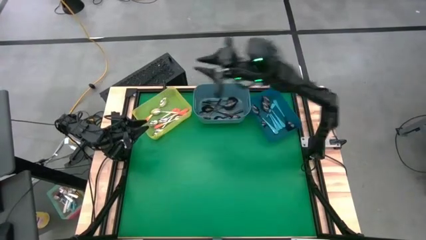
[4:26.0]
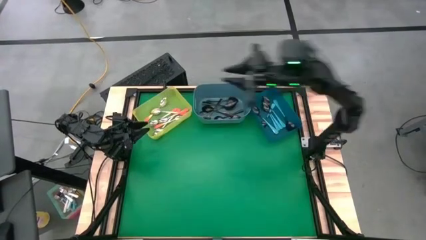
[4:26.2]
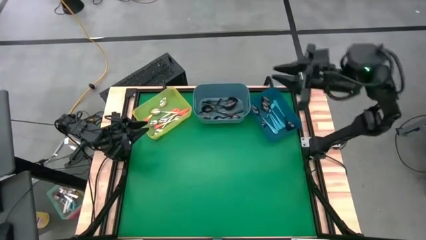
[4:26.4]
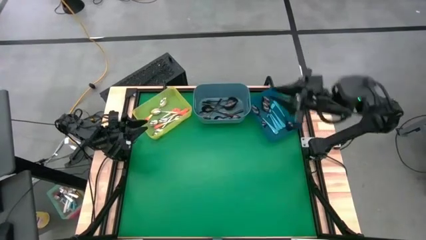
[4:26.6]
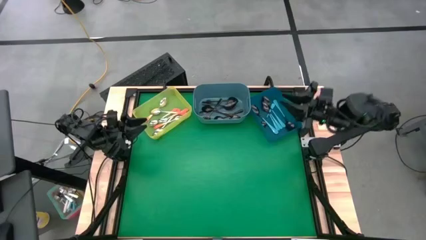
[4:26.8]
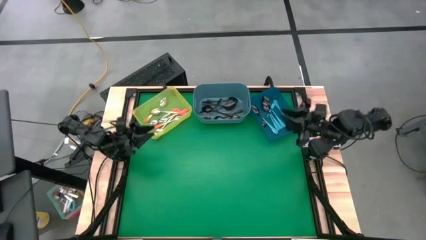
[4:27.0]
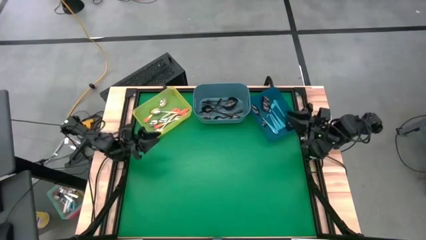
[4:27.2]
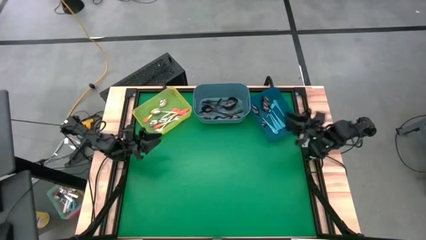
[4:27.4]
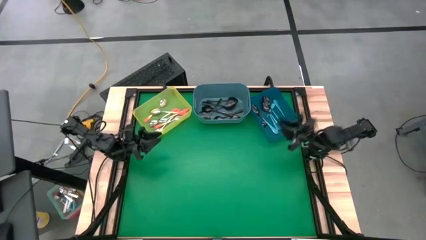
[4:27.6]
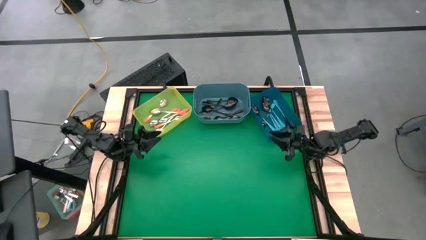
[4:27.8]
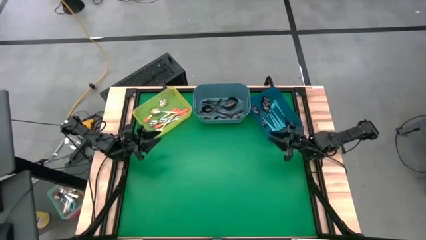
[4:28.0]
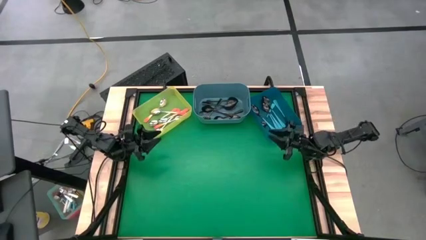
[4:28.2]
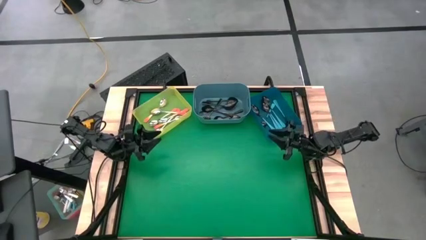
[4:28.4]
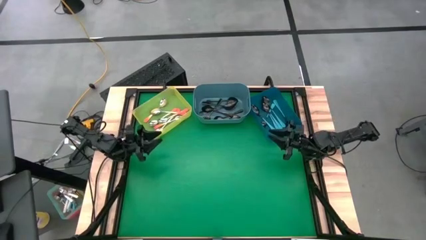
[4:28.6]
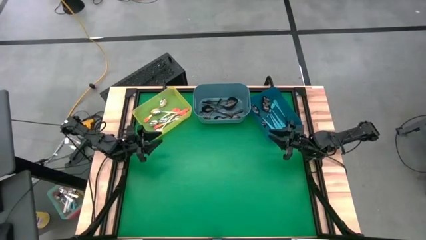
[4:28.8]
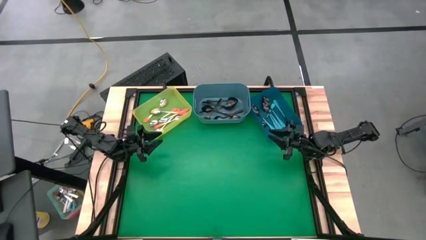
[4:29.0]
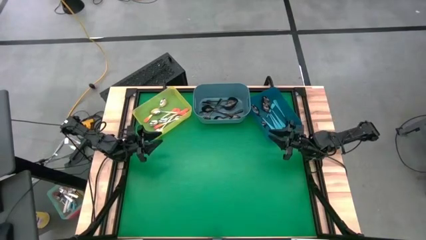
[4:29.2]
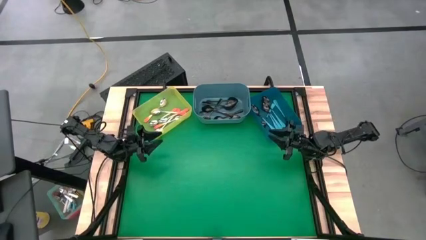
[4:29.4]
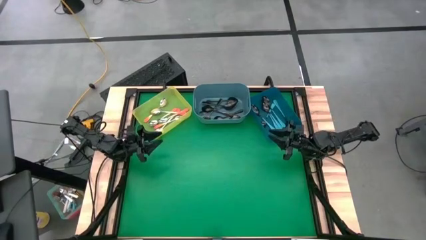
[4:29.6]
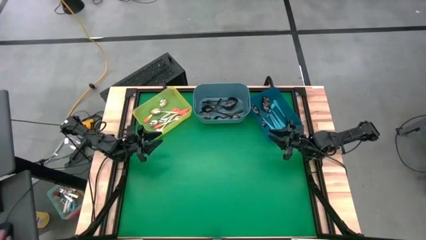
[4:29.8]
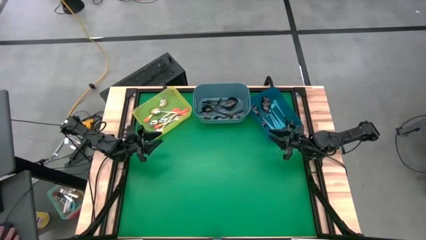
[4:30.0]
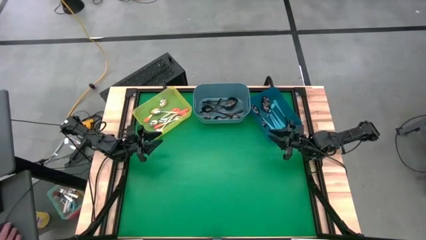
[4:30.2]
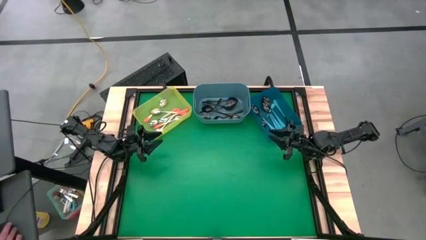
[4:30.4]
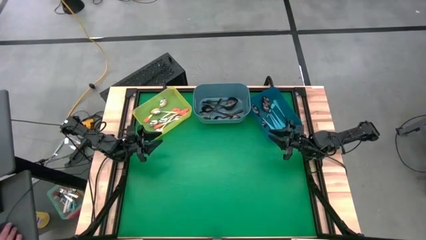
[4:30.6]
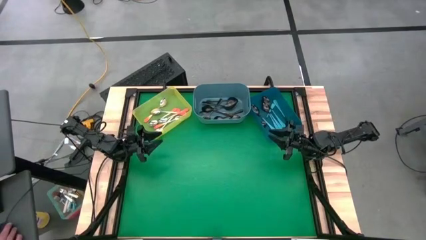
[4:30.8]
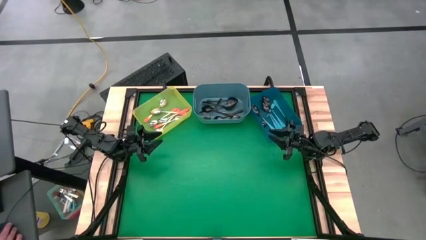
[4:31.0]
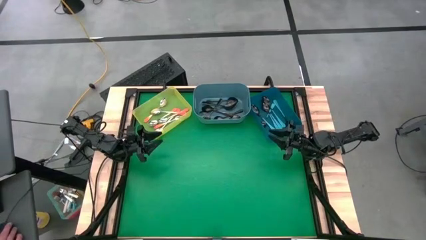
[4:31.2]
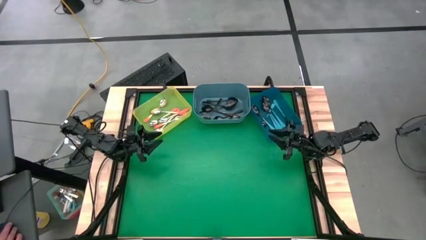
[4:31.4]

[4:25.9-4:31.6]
Task: Sort silverware by color (type)
Return to Home Position

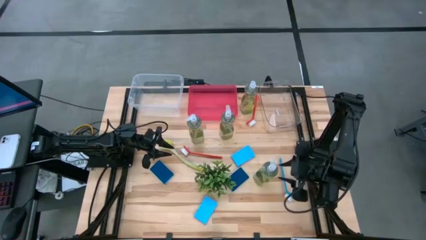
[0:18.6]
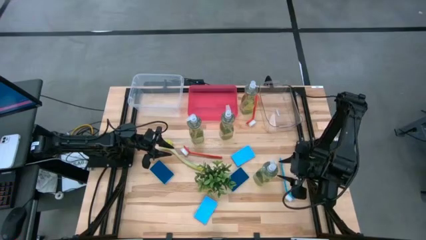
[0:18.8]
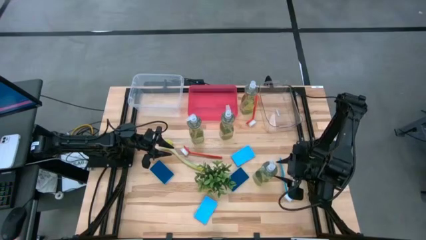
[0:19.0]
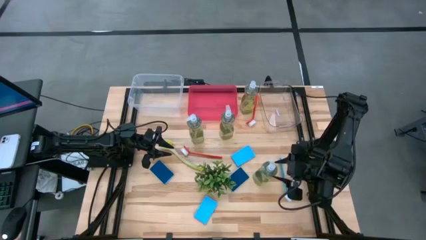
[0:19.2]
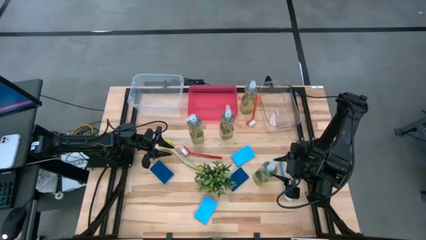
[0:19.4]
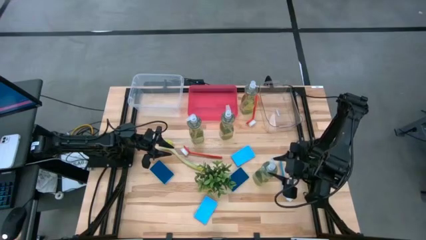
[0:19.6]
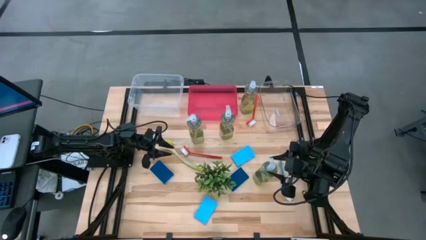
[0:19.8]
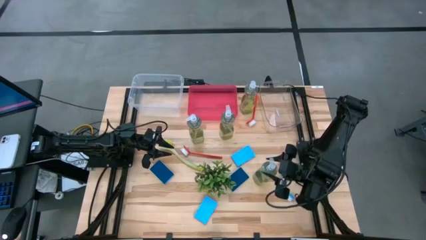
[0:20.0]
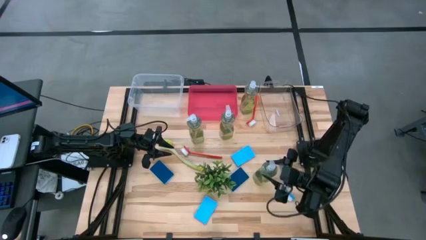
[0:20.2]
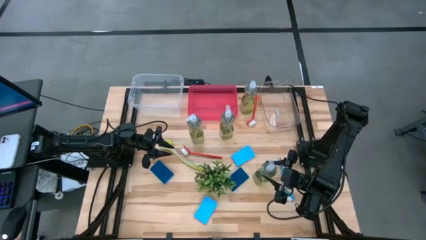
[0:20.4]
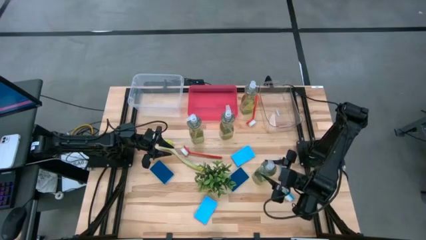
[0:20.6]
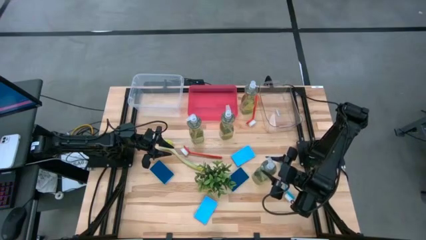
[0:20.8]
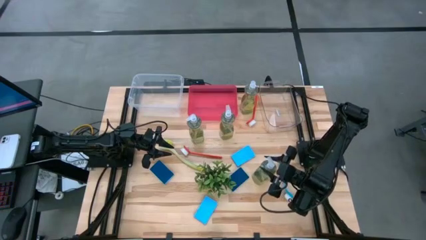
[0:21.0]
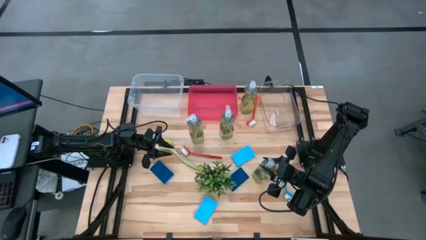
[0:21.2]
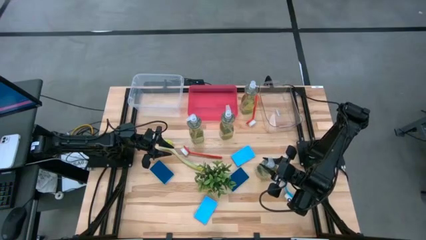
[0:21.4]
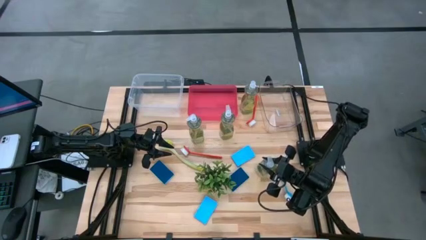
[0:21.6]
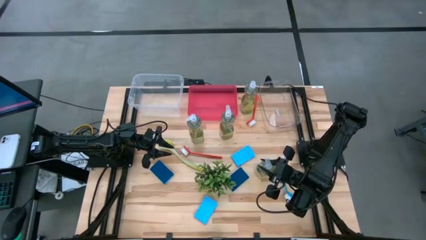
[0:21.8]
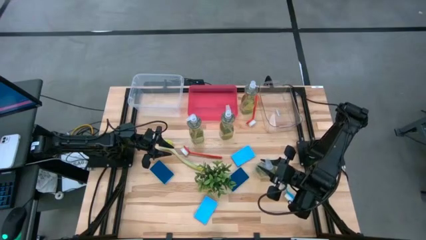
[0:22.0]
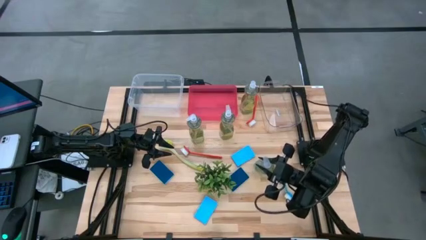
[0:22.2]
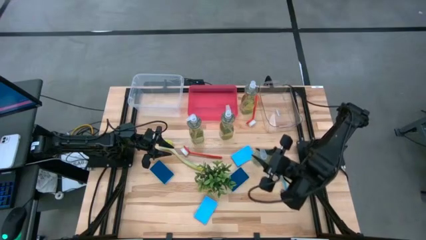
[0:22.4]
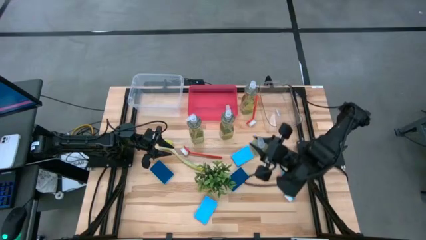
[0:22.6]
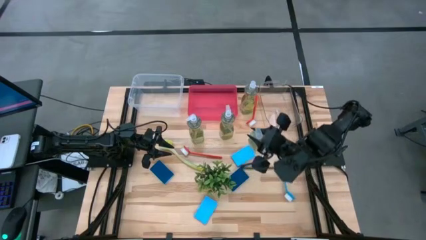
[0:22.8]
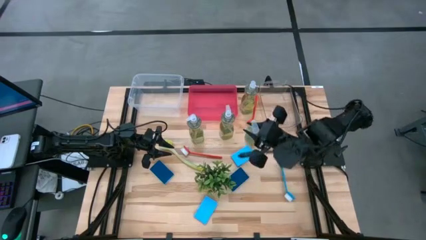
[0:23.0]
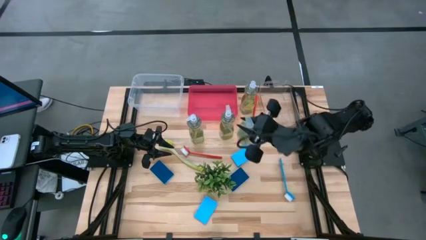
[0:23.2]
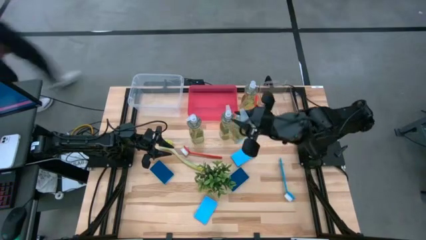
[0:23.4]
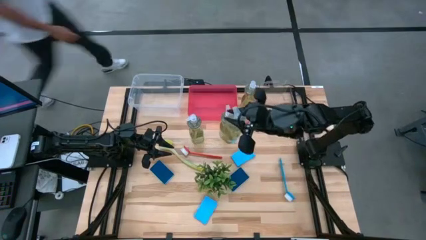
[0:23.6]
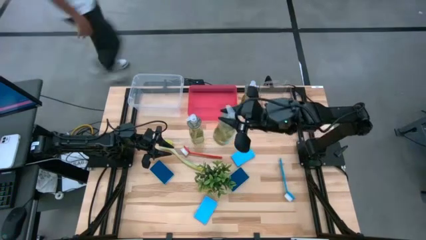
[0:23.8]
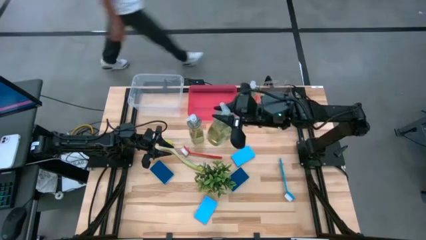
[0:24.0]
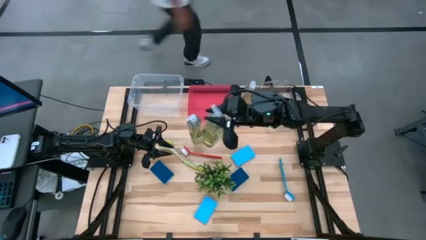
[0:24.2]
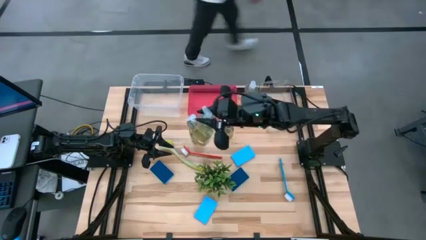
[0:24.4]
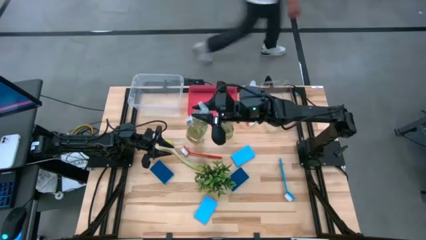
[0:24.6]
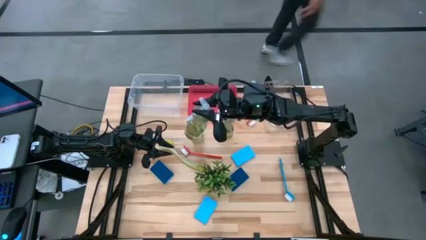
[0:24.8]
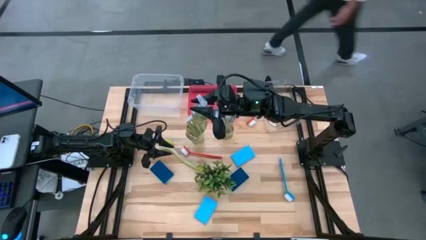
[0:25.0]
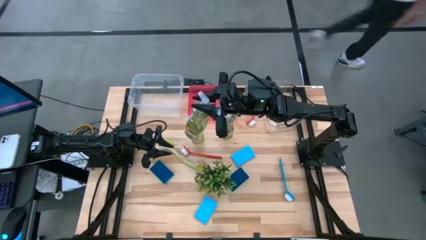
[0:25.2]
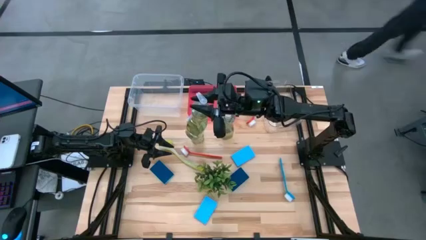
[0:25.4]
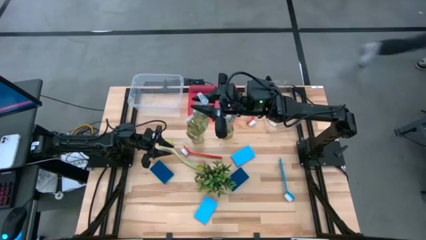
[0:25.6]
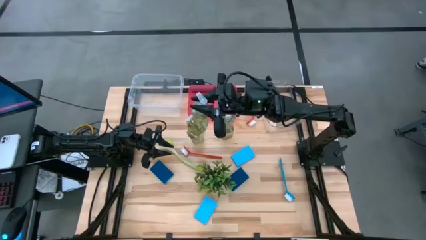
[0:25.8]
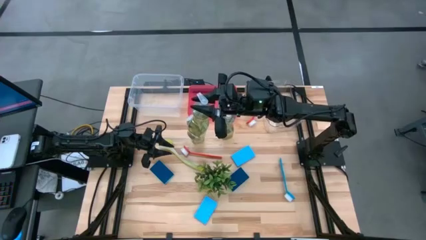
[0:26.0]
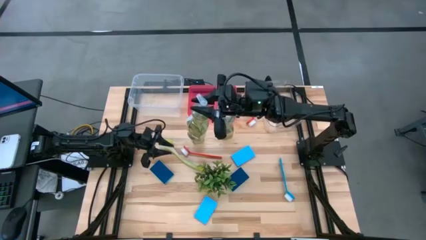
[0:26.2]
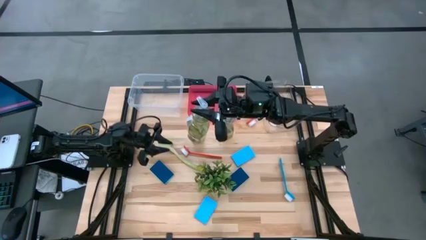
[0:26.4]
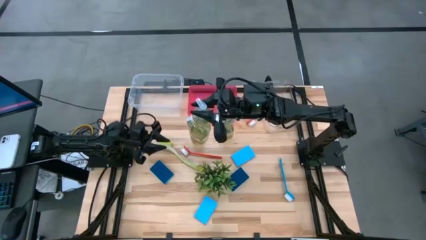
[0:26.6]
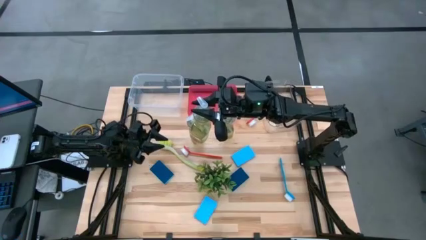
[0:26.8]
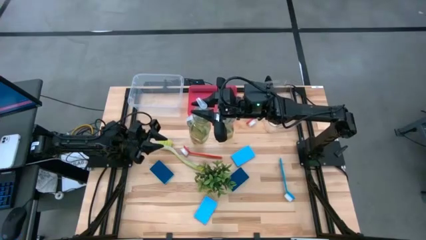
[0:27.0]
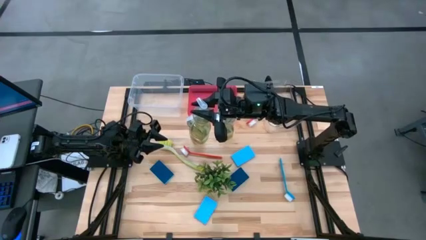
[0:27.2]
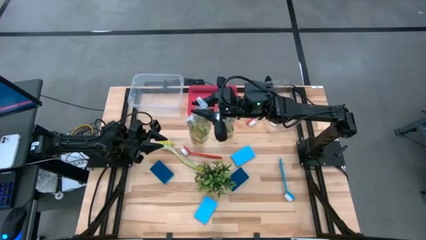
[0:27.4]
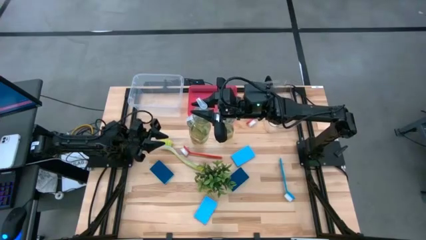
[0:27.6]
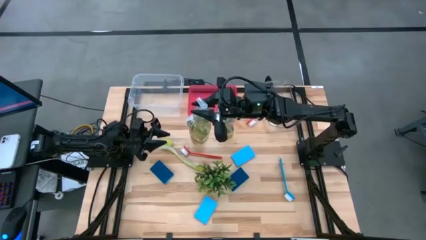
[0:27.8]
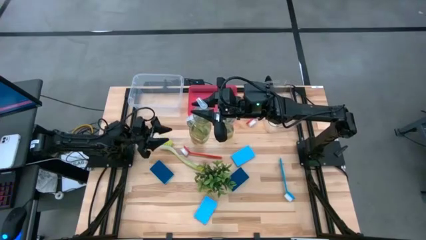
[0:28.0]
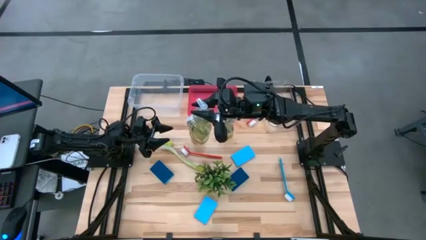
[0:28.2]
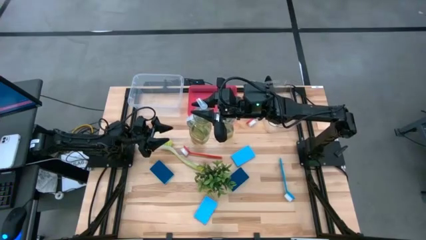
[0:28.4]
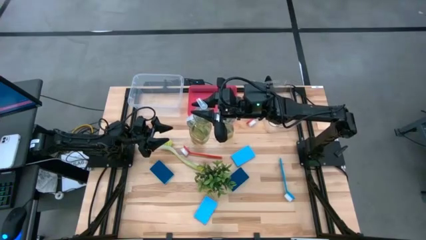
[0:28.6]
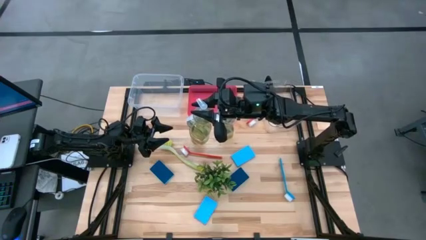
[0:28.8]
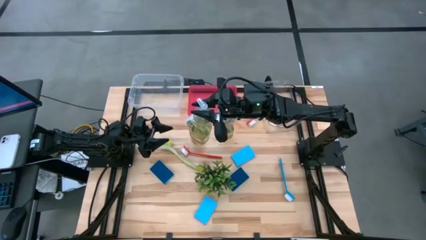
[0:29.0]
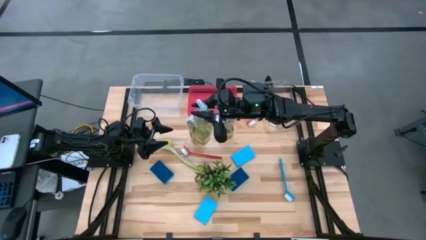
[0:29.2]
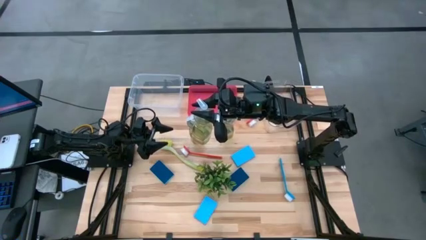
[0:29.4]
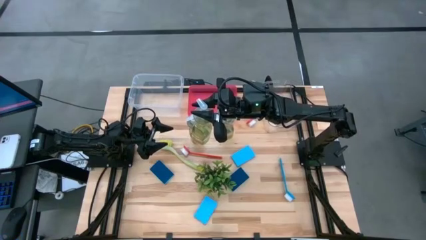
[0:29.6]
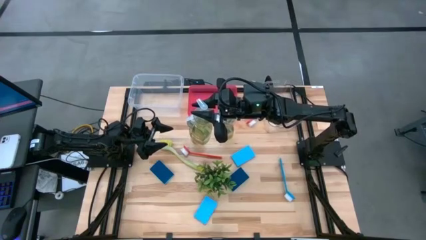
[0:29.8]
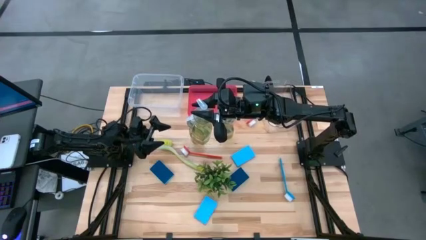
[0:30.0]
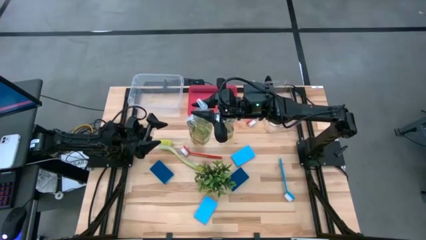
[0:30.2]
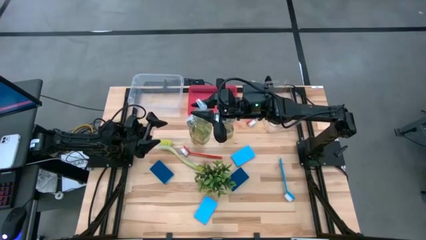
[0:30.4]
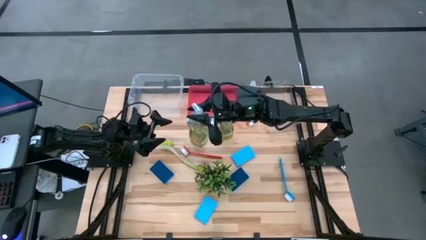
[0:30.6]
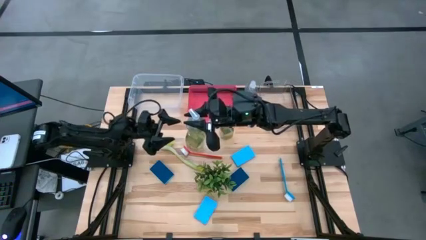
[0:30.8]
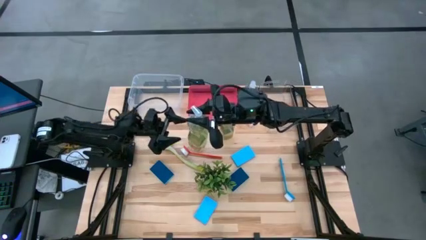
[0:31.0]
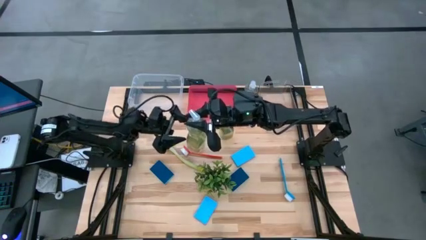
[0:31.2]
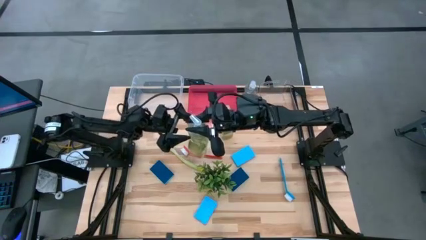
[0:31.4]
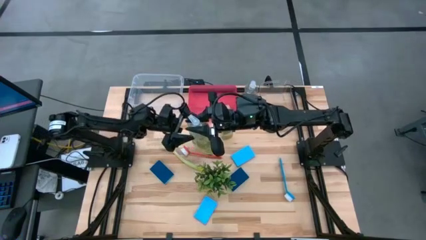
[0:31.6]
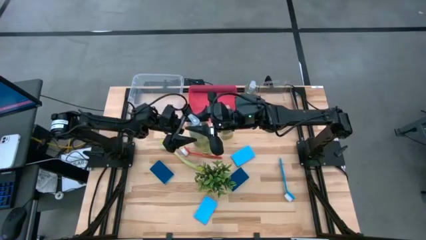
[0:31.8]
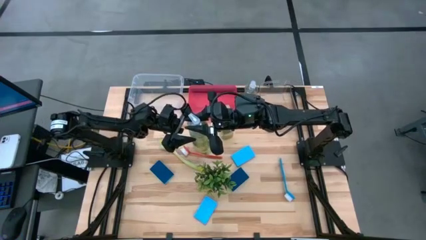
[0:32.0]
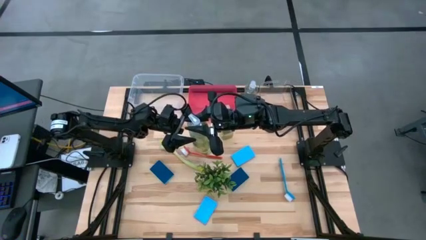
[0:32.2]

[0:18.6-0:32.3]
Task: Pick & Place Kitchen Sink Supplies
Put the yellow dishwashing liquid into the white bin
